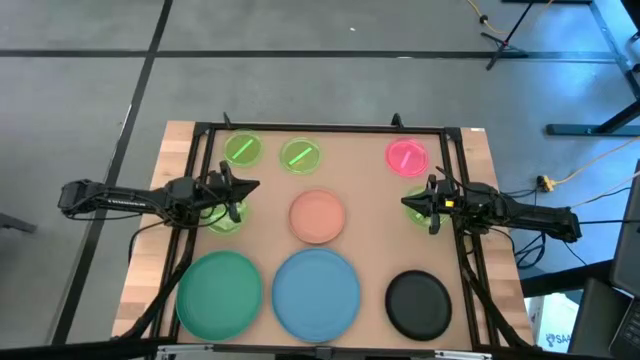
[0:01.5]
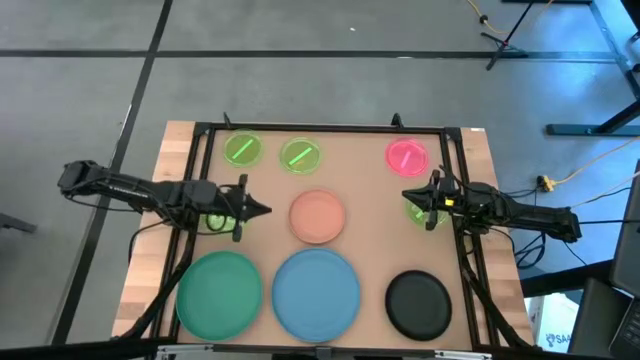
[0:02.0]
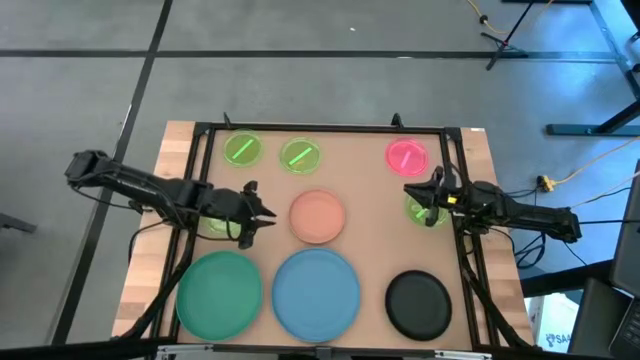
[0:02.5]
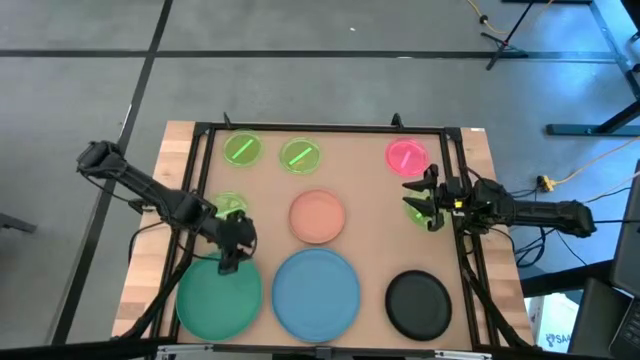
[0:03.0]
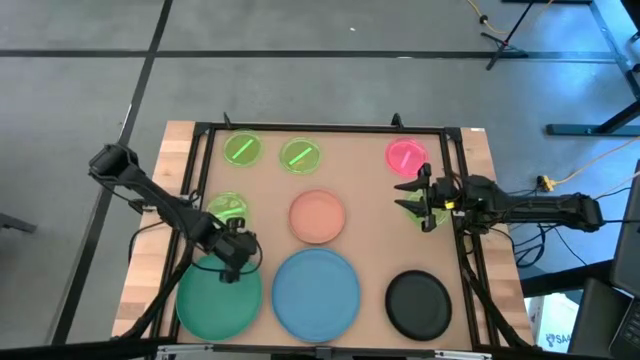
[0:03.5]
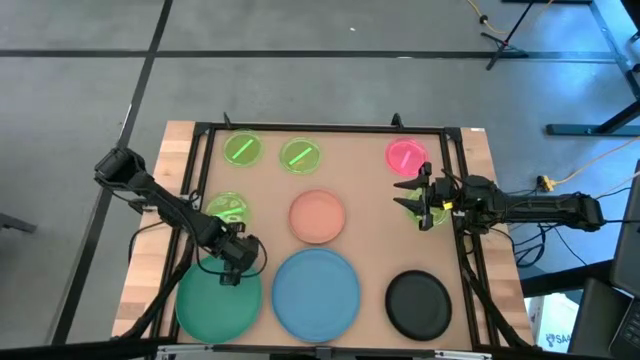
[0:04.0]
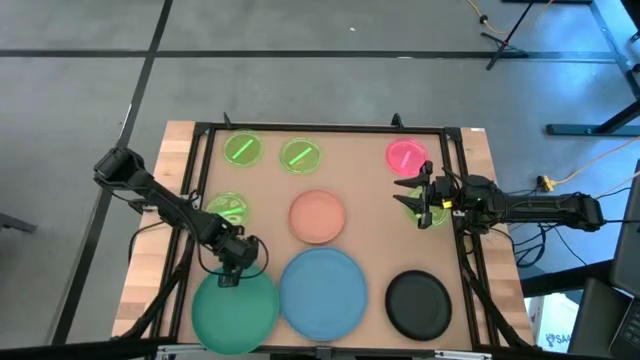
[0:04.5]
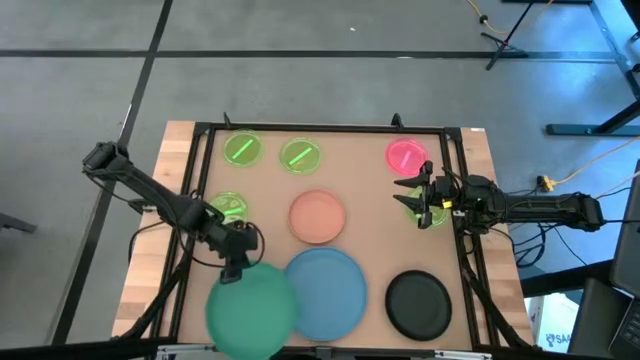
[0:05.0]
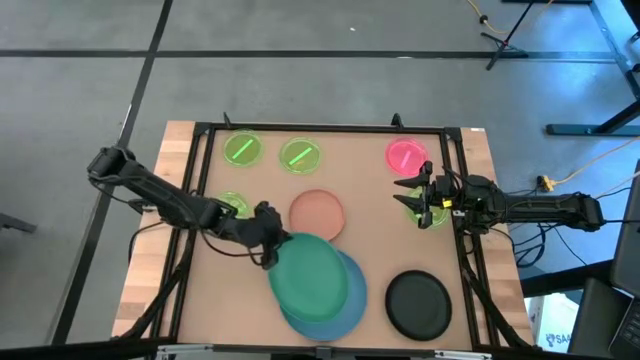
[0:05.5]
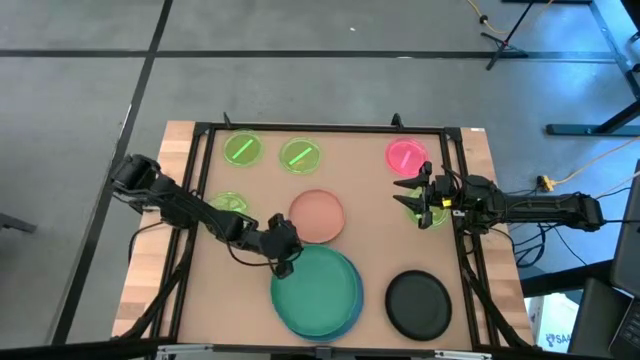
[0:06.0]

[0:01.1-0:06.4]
Task: Stack plastic plates
Stack the dark green plate on top of the blue plate

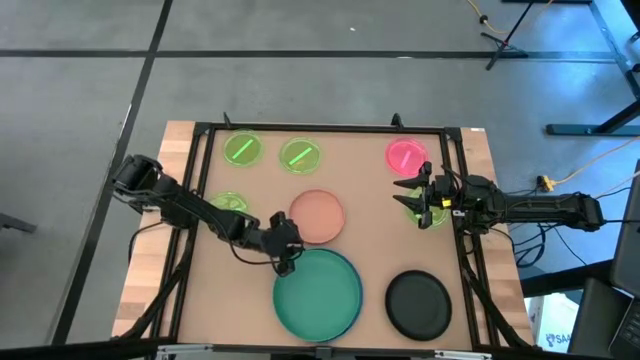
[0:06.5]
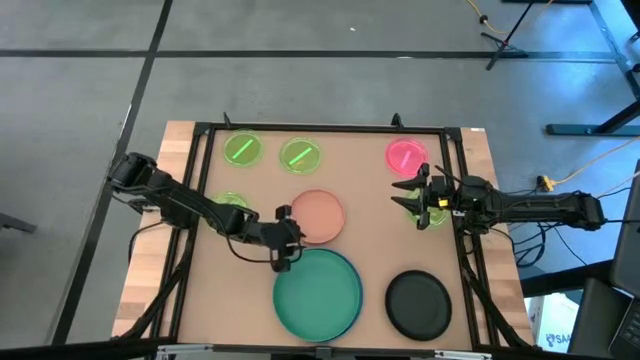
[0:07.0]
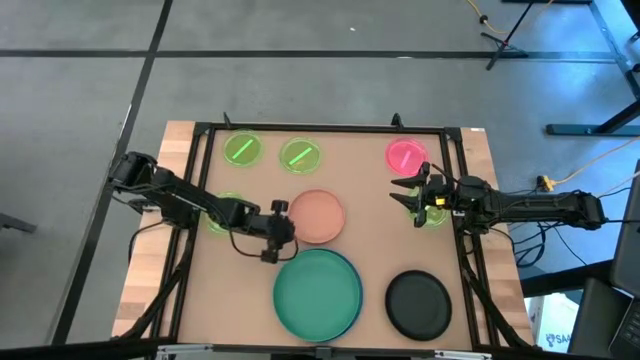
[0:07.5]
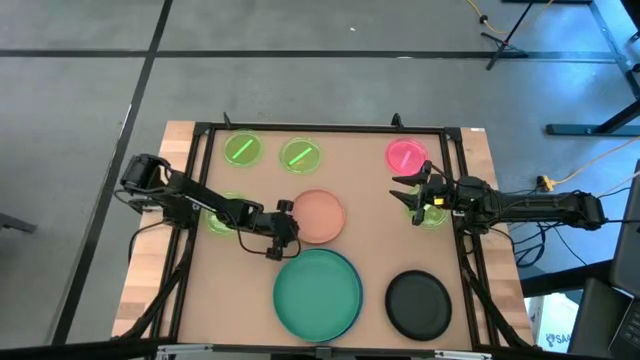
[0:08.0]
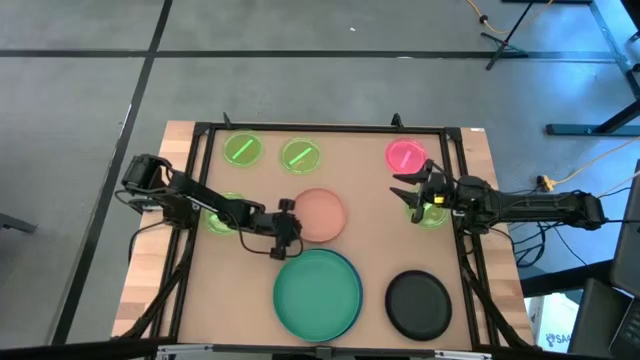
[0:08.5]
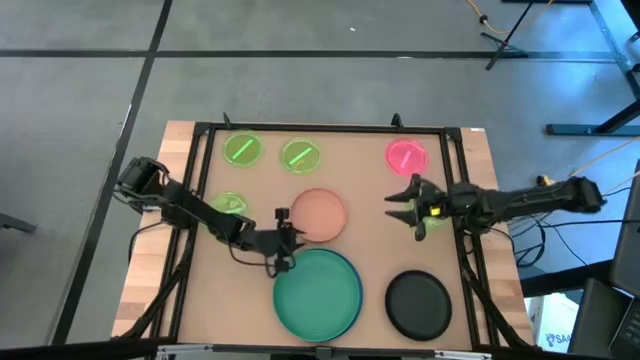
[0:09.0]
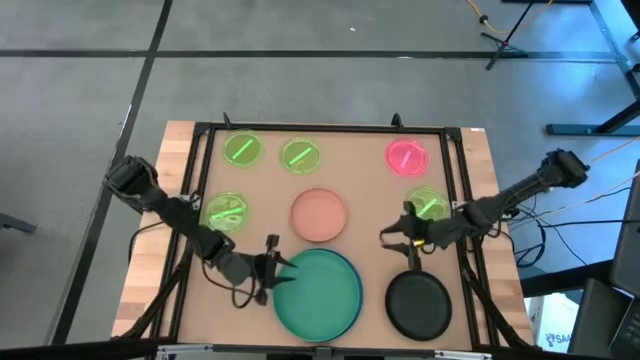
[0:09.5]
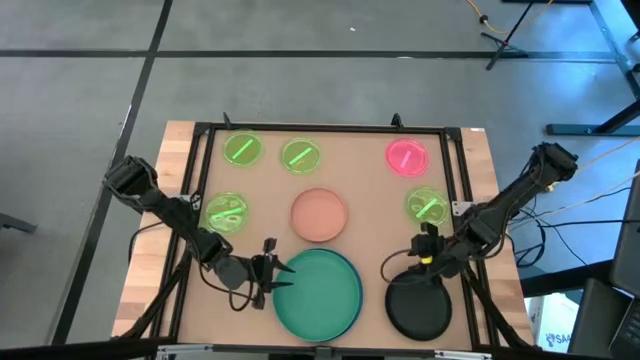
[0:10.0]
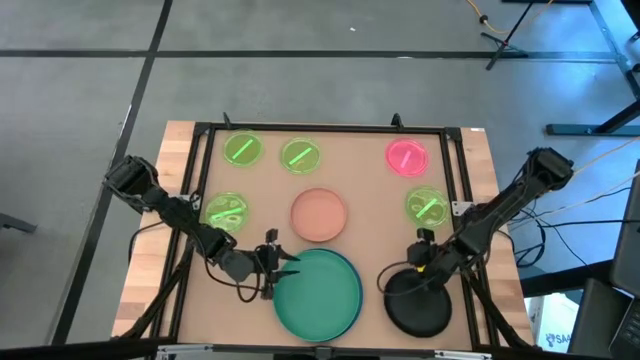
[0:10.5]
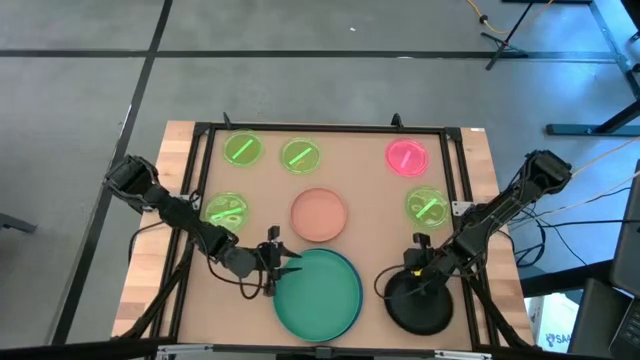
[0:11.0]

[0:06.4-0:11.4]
Stack the black plate on top of the dark green plate

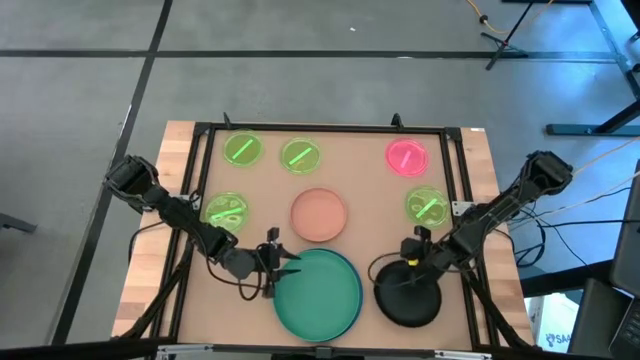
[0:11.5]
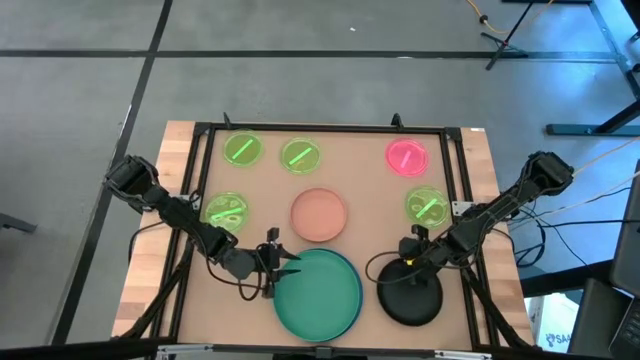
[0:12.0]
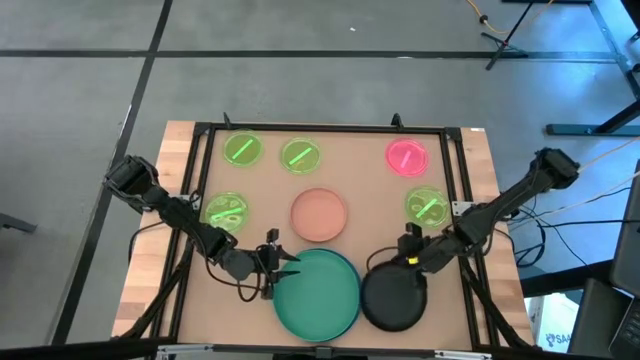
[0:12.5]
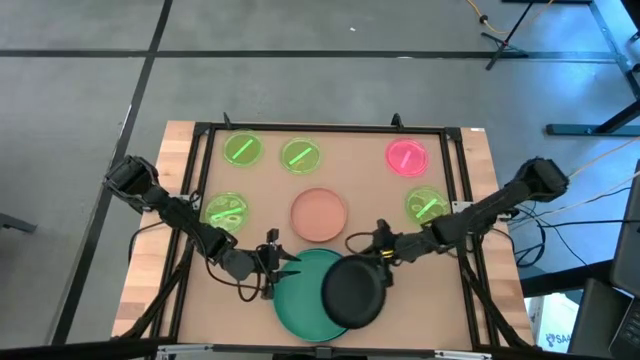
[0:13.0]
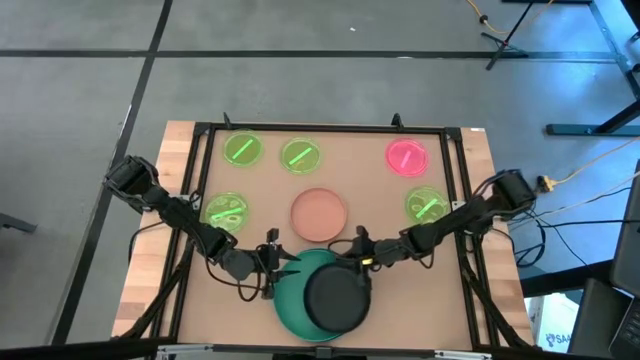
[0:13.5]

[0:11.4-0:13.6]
Stack the black plate on top of the dark green plate

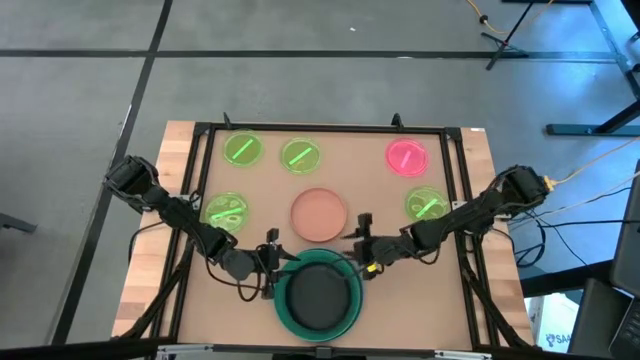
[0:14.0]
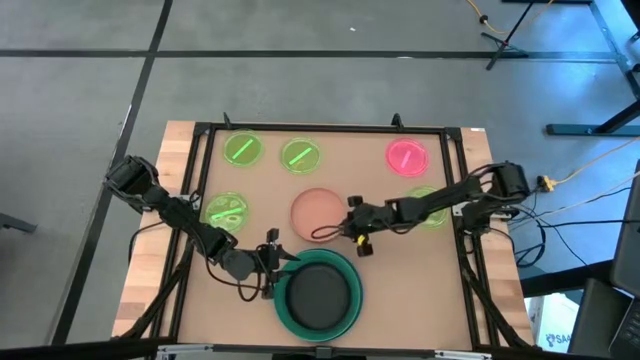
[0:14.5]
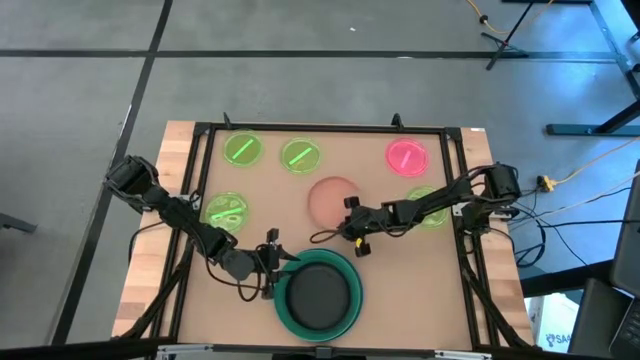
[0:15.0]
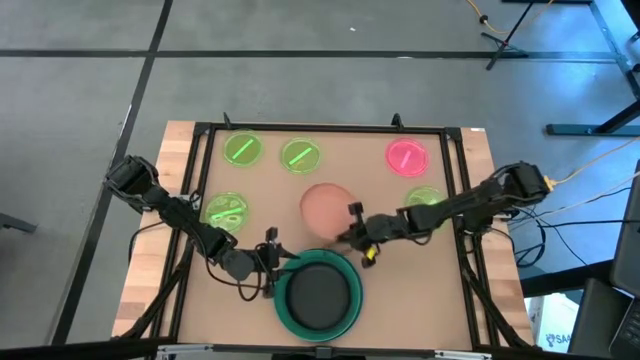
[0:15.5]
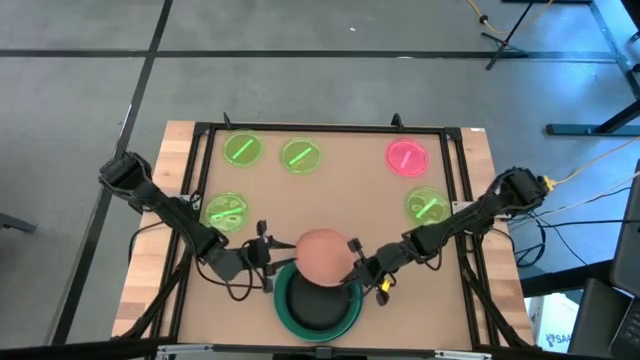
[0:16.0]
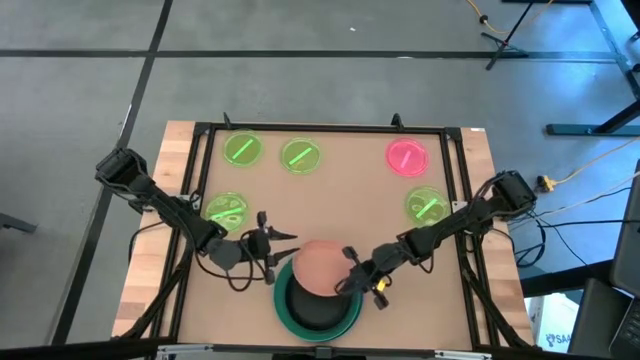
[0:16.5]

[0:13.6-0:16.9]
Stack the orange plate on top of the black plate

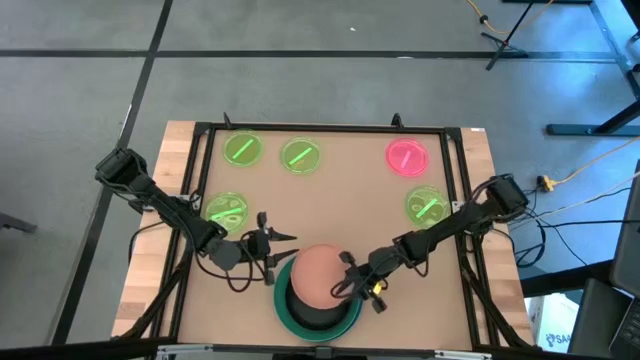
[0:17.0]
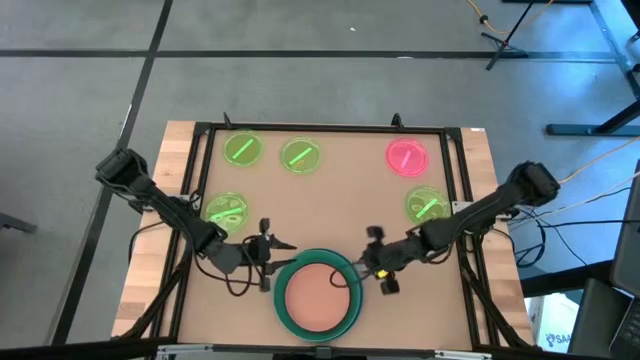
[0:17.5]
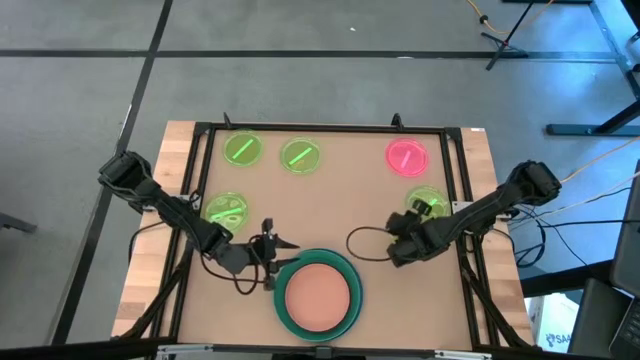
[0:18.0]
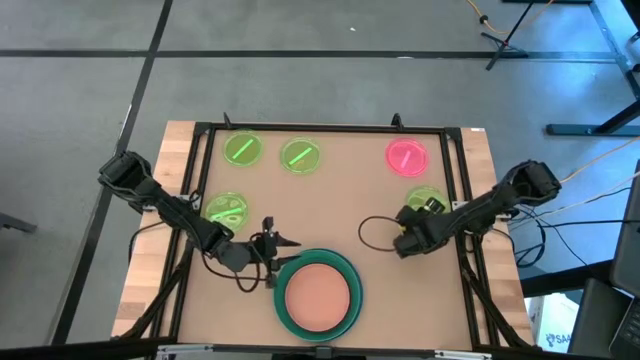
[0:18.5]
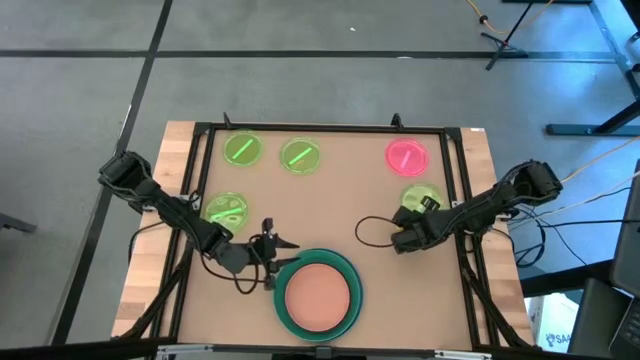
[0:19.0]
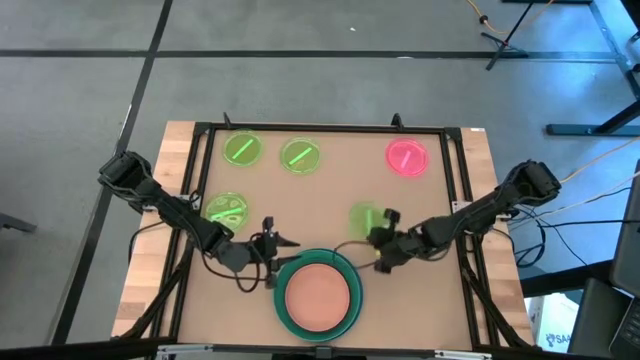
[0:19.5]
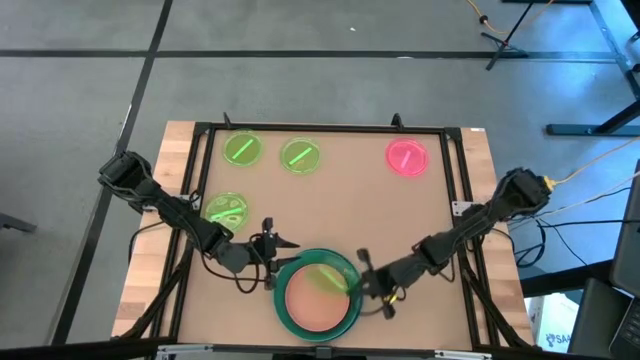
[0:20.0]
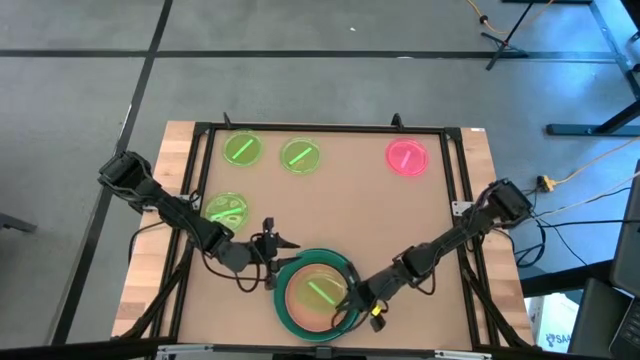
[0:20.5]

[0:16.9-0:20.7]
Stack the light green plate on top of the orange plate

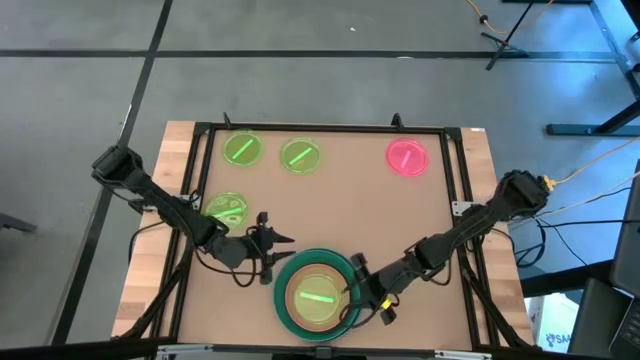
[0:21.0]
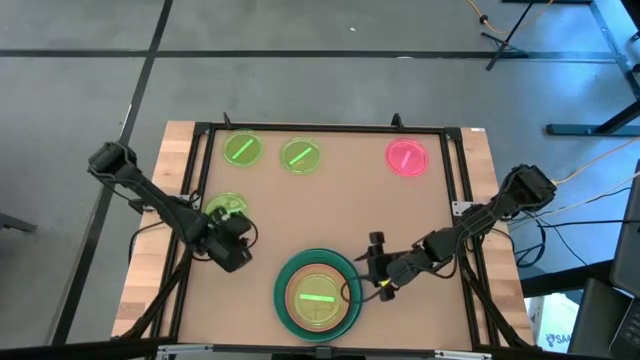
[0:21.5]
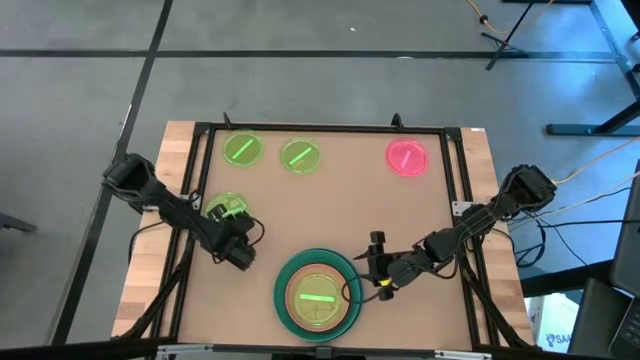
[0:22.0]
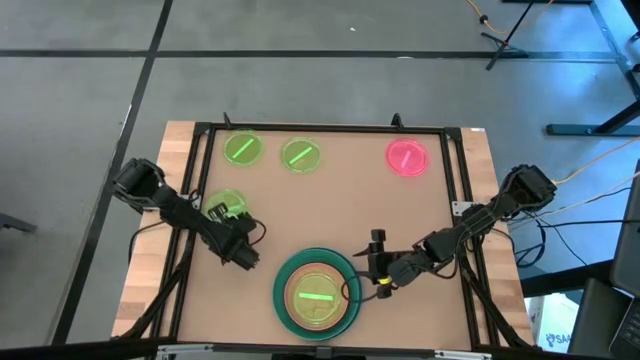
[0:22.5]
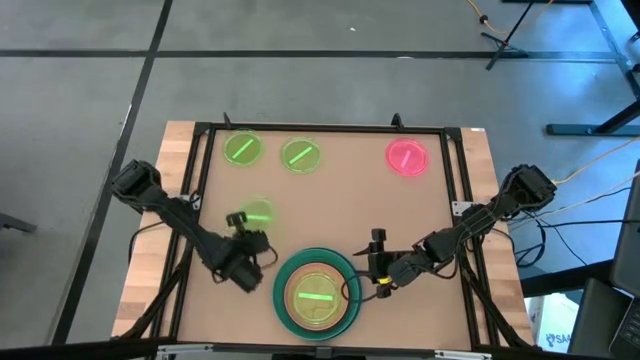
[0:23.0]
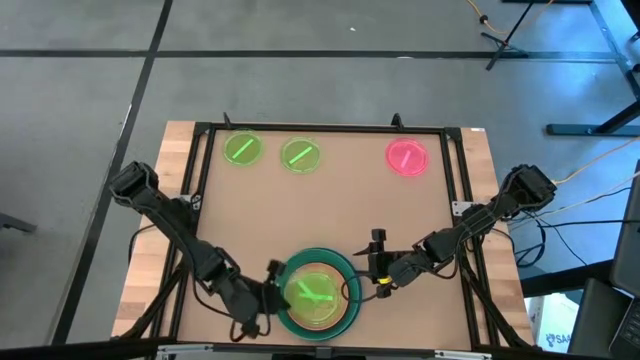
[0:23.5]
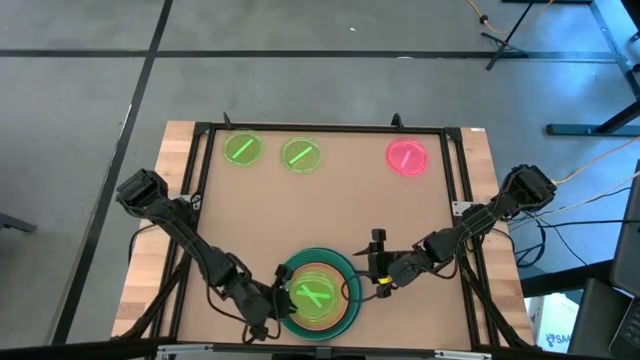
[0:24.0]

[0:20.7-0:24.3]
Stack the bottom light green plate on top of the light green plate
